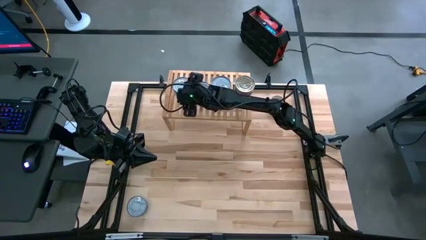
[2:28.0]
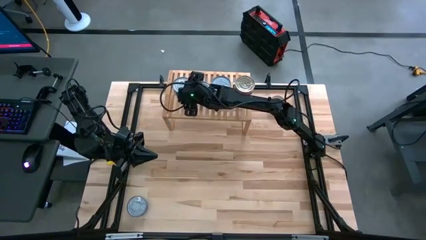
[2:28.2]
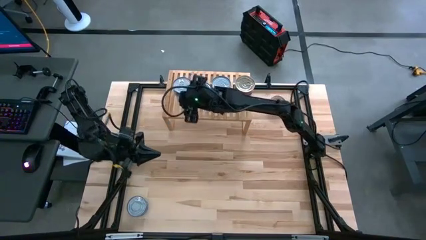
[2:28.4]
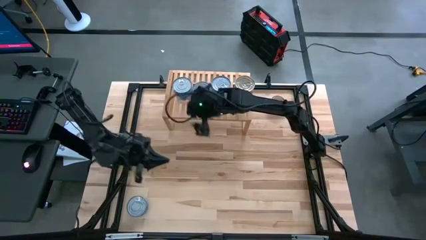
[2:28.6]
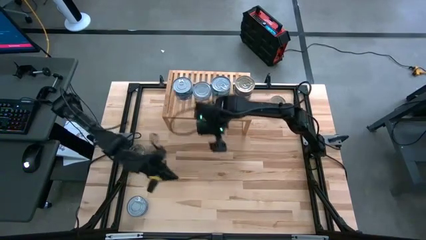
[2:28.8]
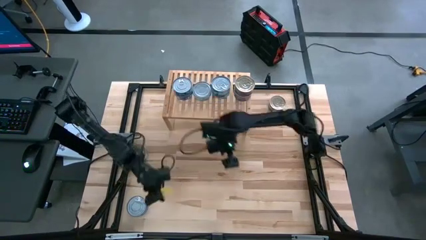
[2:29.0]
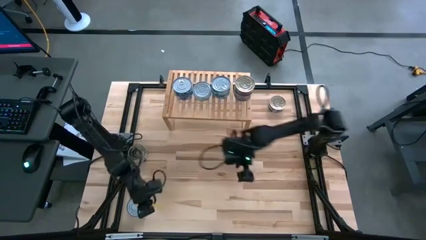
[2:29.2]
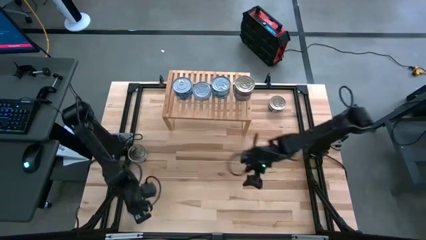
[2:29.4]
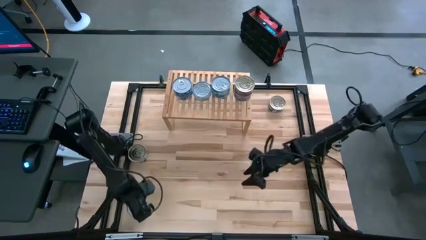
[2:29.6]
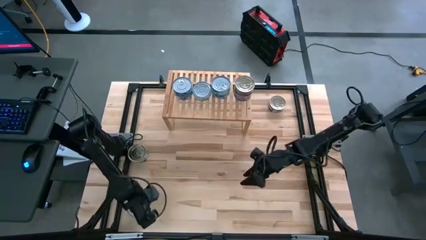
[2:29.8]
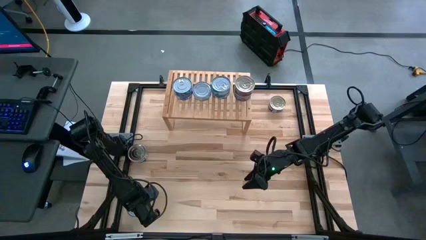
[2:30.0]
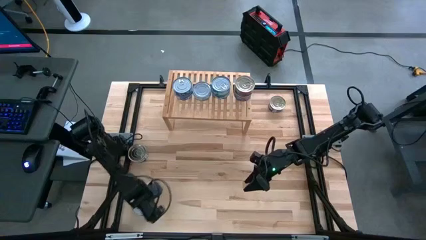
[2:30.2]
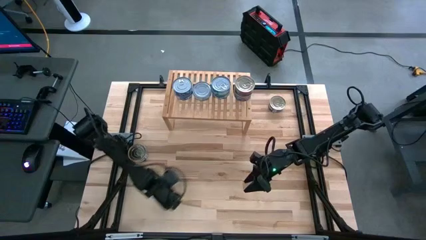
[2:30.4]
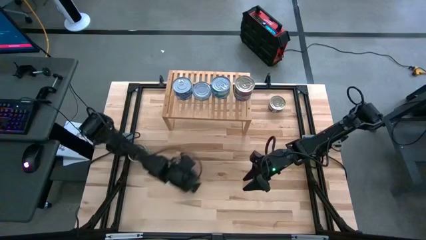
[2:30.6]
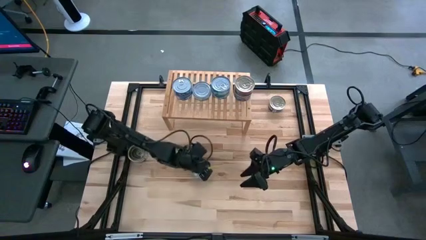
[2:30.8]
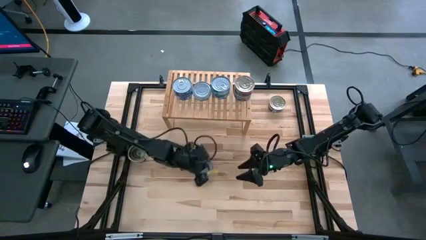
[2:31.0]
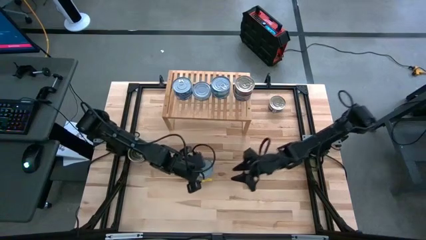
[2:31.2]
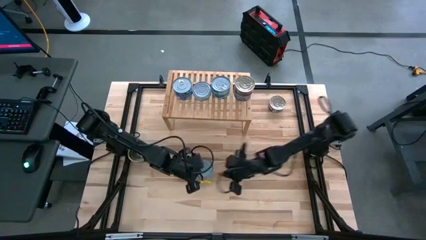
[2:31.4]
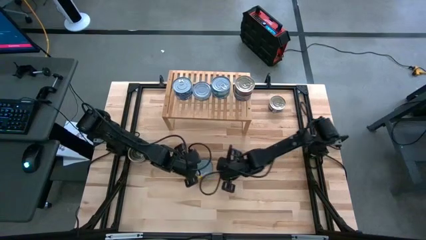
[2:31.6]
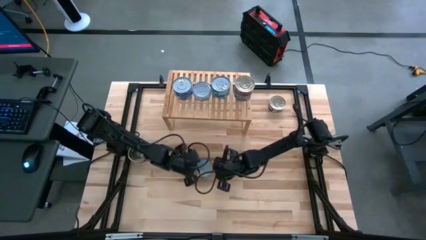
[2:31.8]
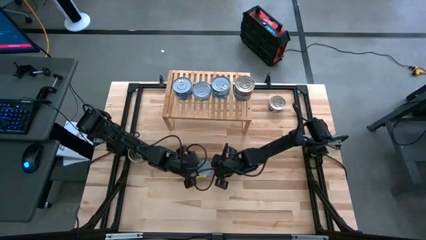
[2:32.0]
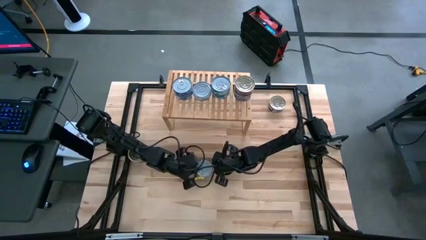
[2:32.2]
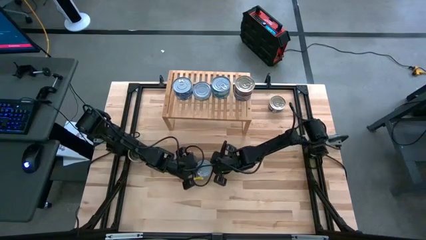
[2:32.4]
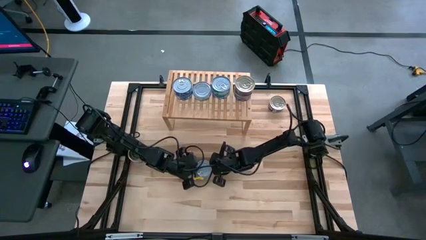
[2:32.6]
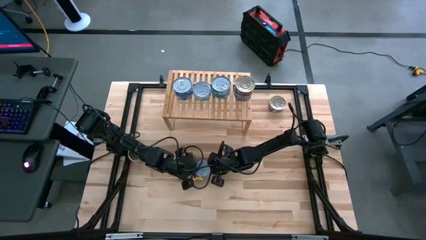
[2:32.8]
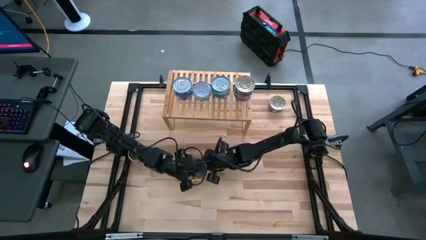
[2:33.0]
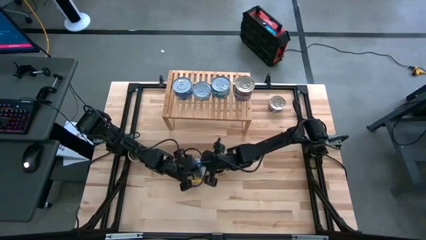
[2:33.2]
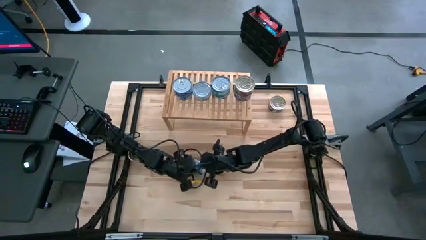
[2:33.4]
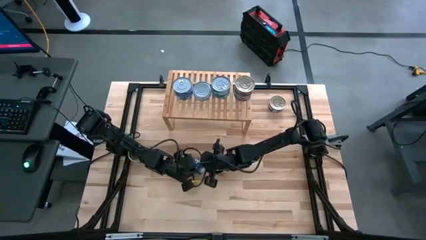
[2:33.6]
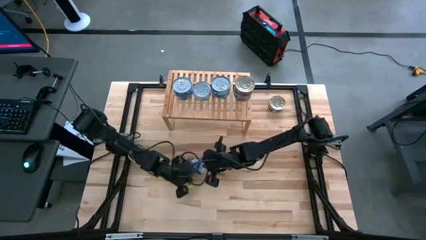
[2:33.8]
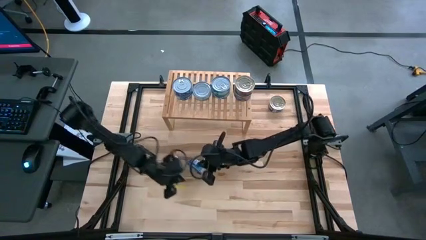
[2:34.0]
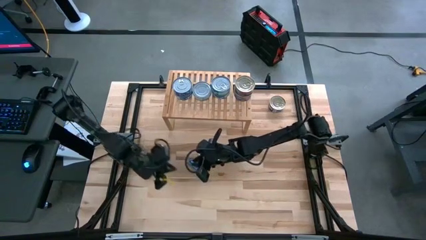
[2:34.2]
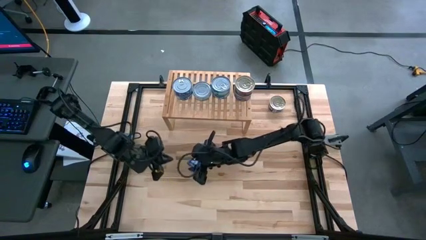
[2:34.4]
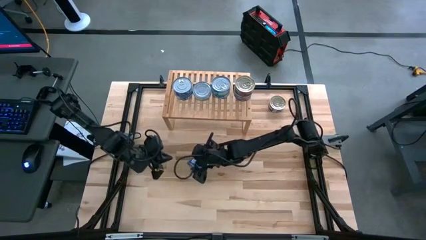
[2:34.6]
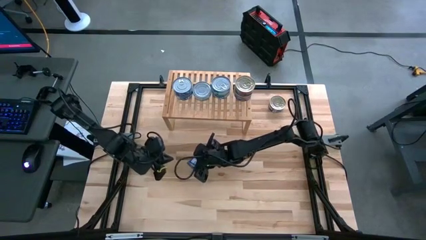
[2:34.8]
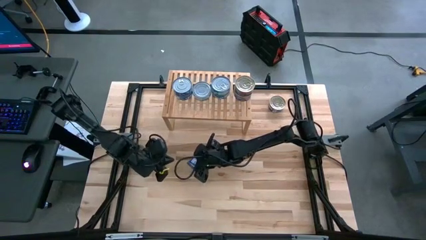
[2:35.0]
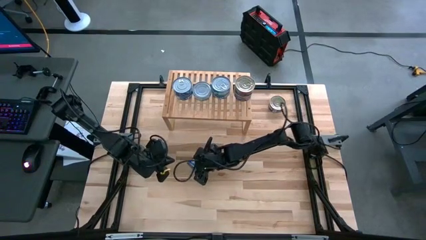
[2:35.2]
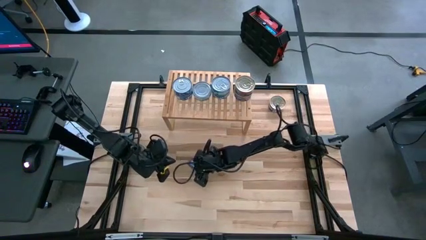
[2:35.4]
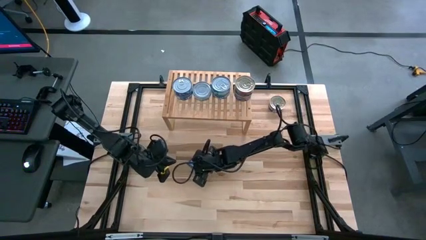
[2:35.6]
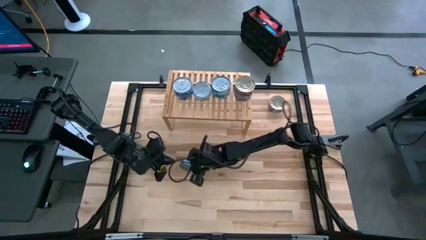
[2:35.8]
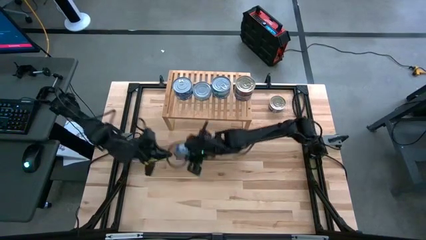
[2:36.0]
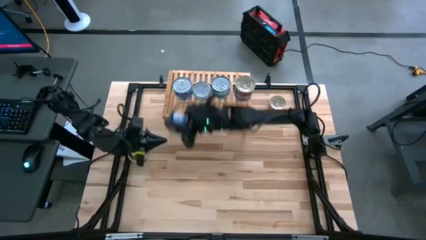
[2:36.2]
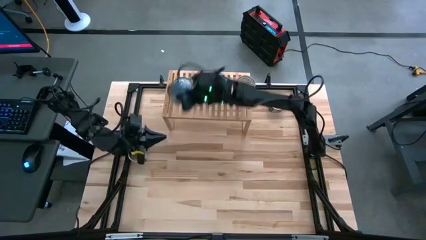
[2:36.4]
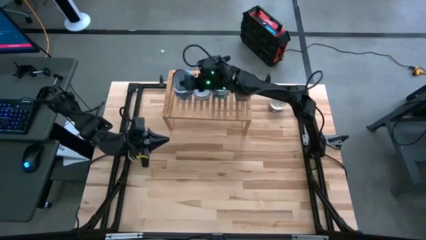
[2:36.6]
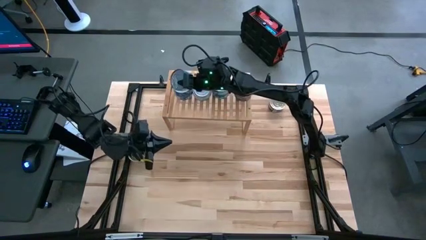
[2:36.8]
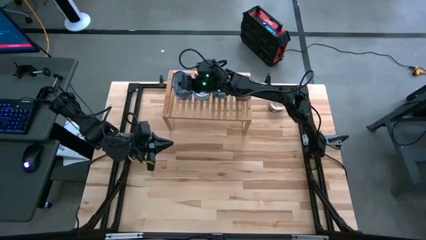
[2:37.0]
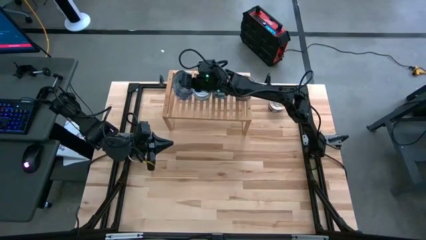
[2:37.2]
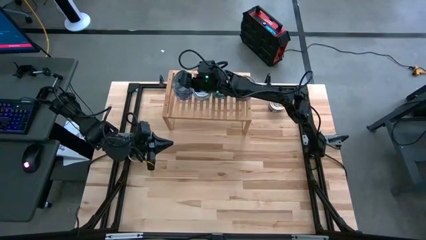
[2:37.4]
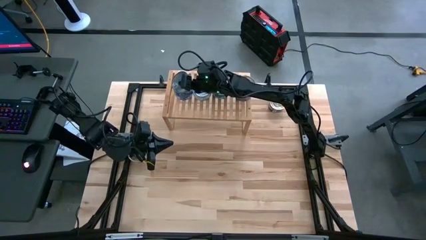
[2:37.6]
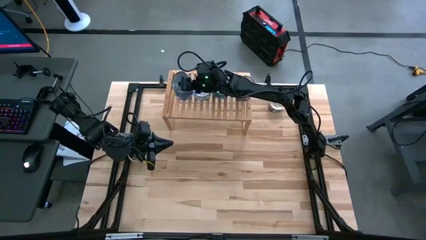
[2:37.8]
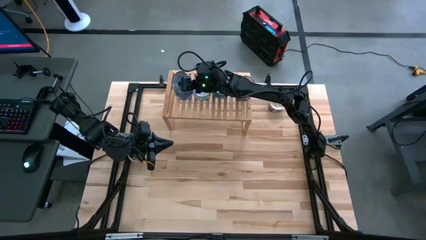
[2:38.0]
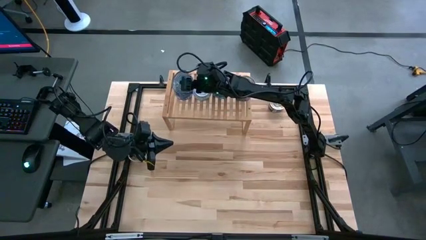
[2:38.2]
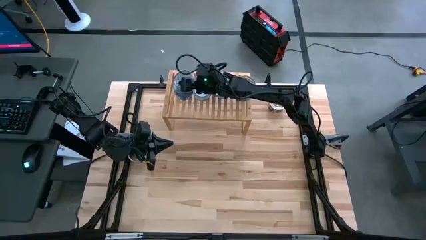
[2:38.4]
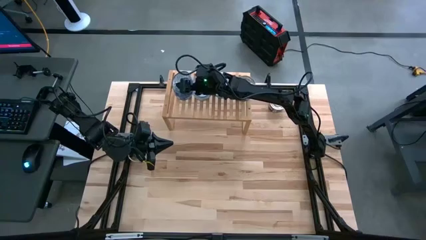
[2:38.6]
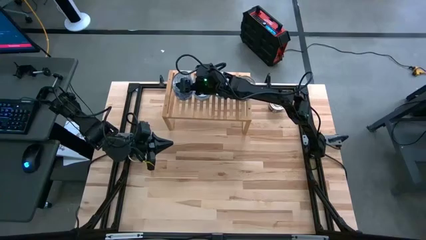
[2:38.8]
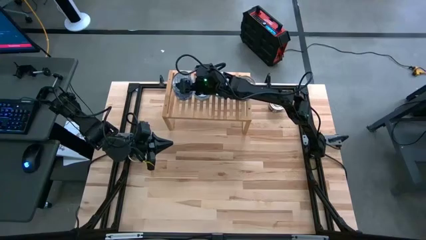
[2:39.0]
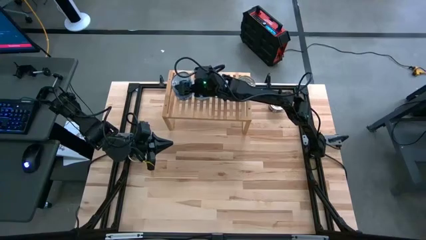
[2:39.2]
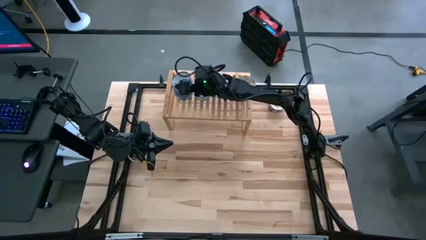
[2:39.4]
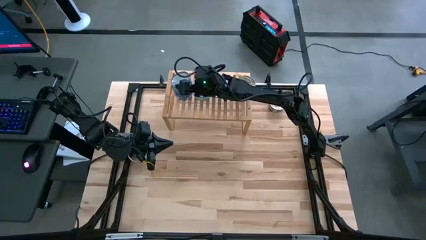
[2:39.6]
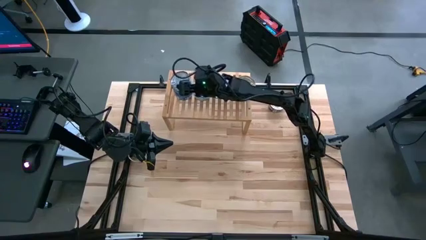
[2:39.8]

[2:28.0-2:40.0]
Task: Stack canned seafood by type on shelf
Stack the blue tuna can on top of the other blue tuna can on the shelf

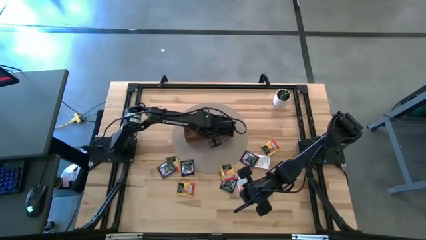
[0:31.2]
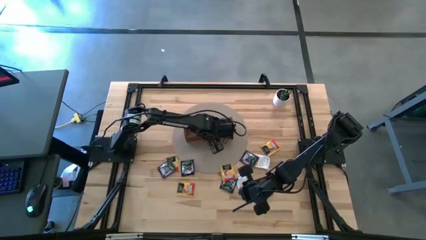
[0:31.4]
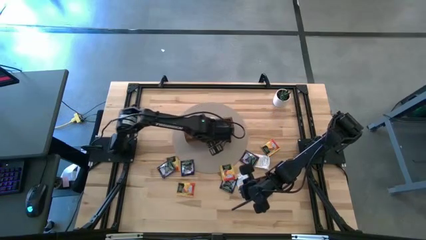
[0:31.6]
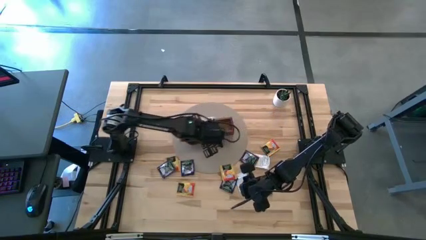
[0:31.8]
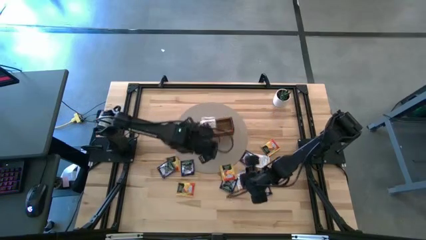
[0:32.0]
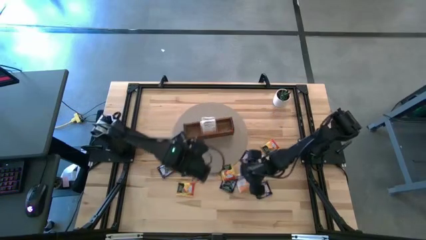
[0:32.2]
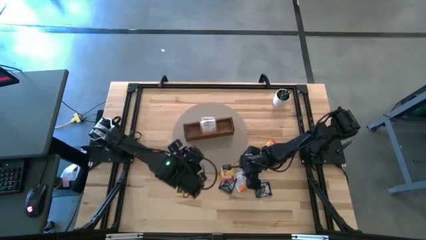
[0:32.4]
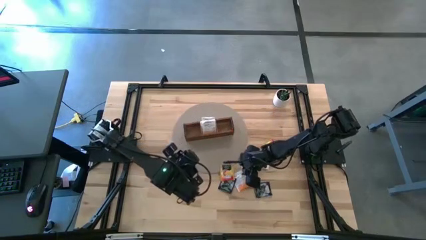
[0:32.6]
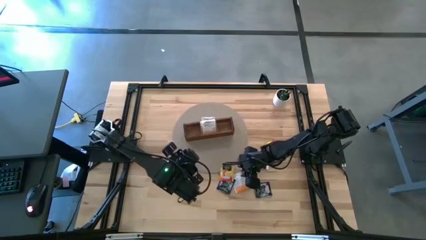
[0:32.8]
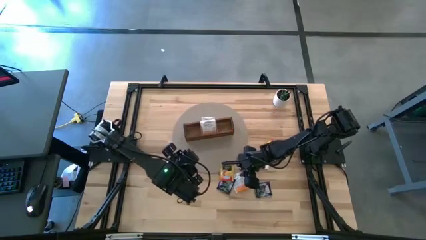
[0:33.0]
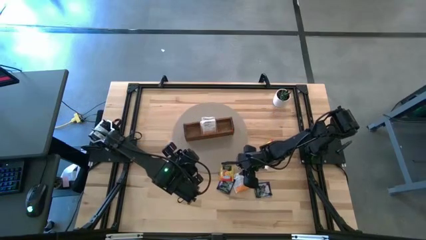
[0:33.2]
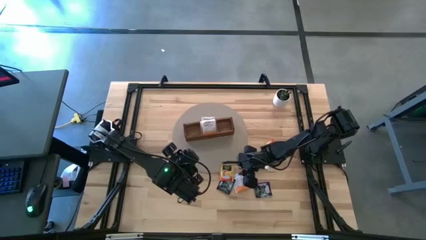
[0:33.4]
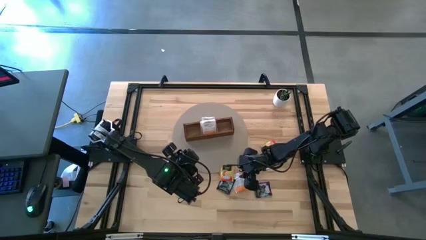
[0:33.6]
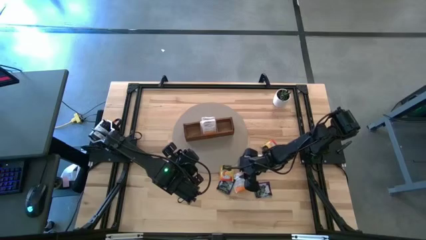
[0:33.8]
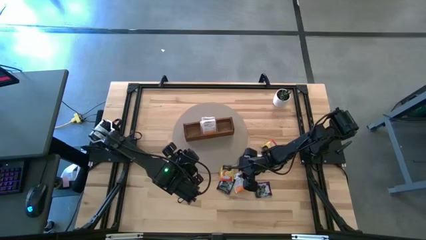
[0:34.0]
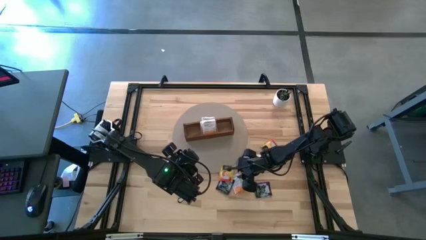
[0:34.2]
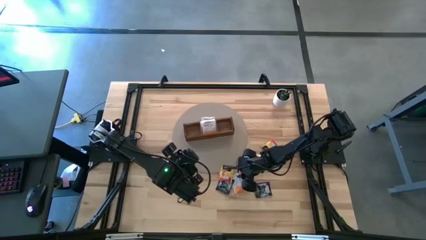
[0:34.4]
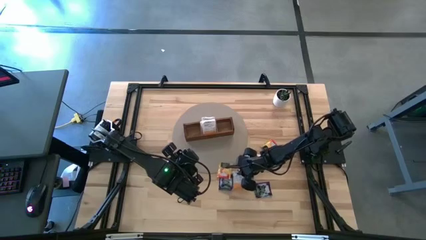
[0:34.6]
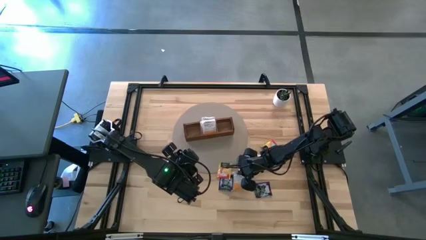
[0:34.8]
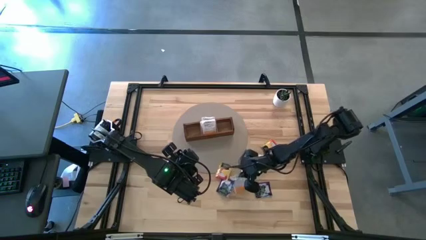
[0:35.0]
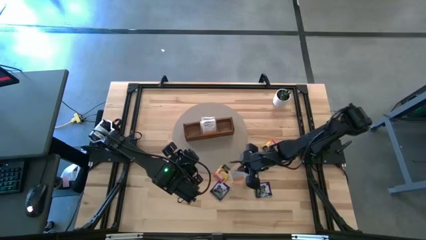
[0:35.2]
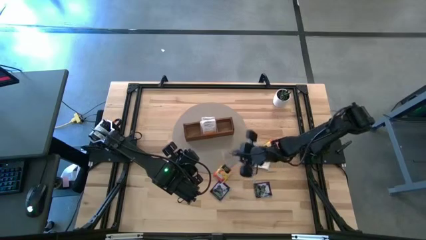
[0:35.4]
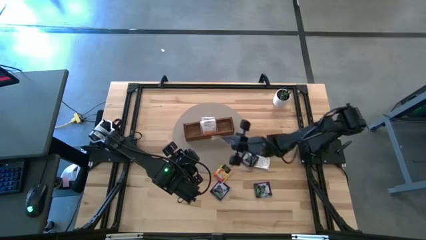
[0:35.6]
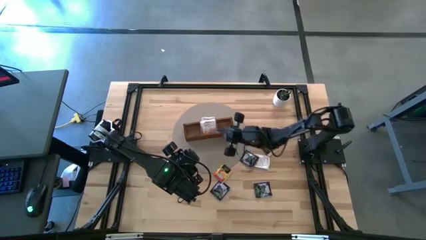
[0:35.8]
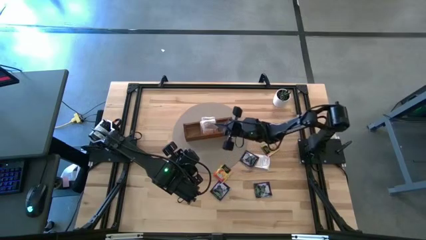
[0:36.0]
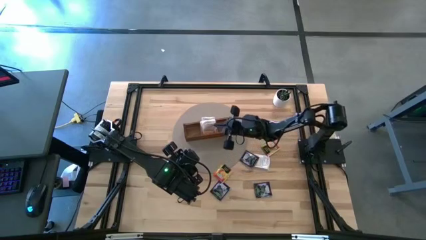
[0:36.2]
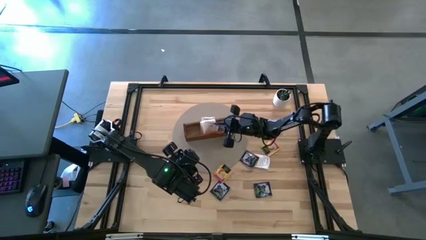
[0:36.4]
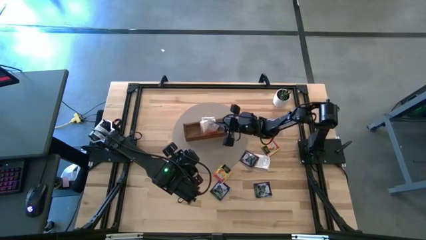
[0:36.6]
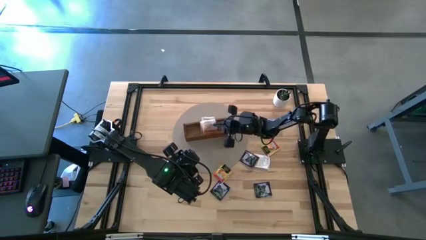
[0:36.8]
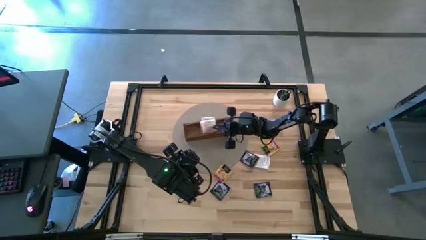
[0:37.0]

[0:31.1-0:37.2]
Task: Pick & Place Tea
Put the white tea bag into the middle section of the wooden organizer
